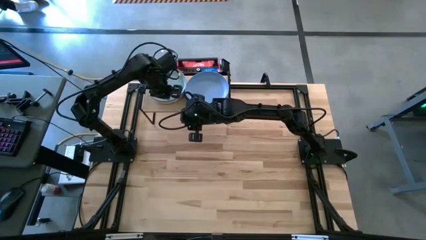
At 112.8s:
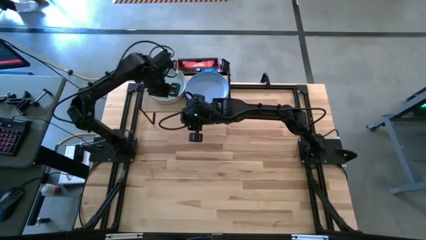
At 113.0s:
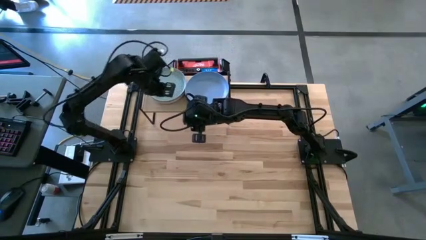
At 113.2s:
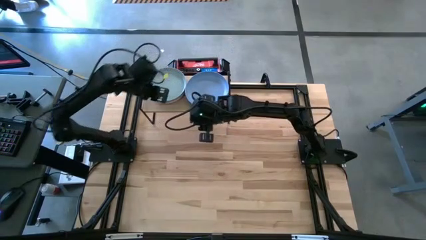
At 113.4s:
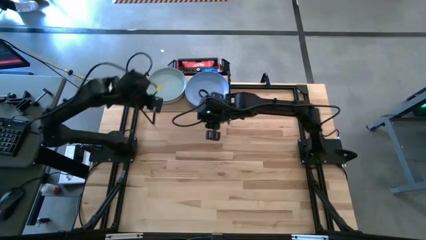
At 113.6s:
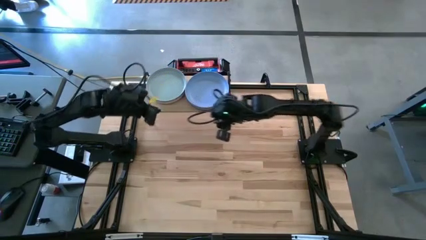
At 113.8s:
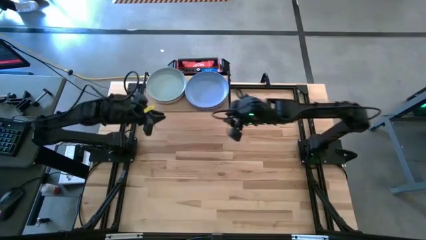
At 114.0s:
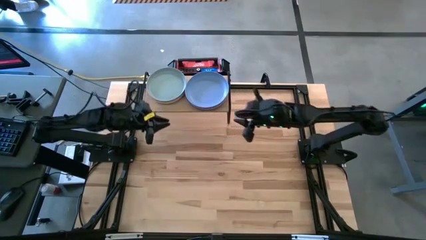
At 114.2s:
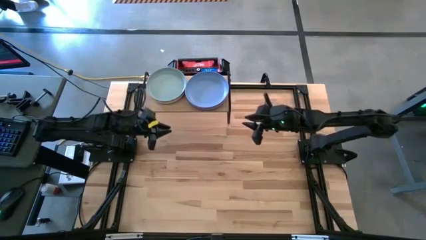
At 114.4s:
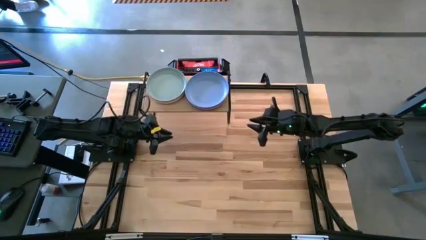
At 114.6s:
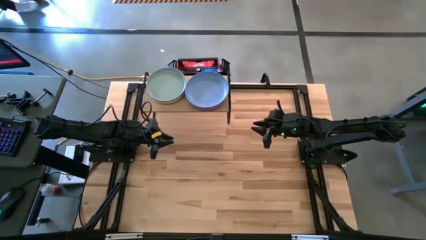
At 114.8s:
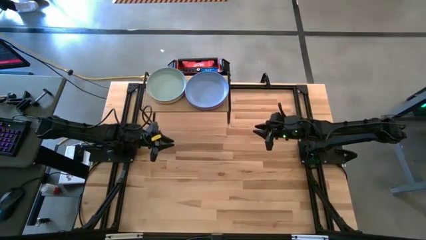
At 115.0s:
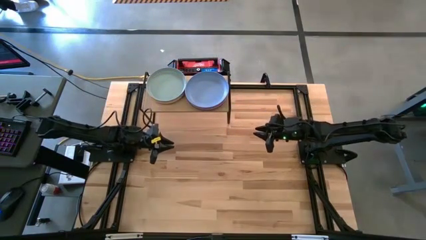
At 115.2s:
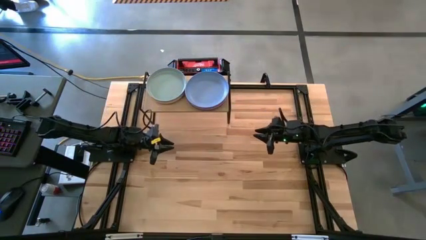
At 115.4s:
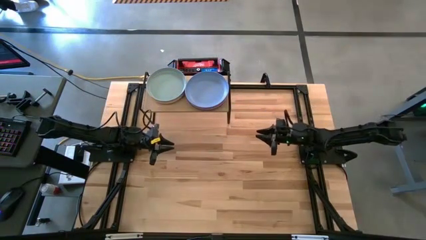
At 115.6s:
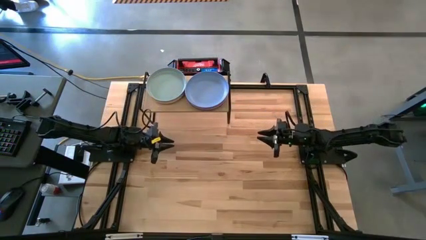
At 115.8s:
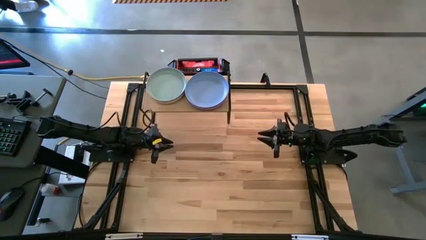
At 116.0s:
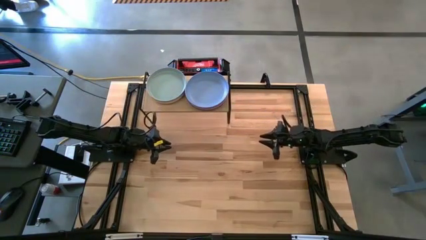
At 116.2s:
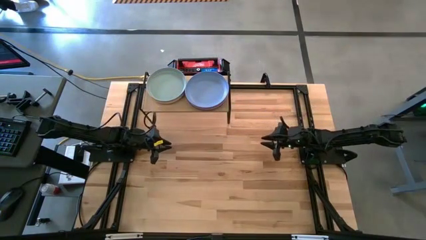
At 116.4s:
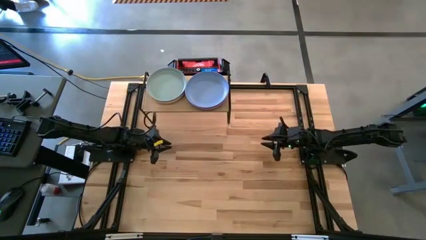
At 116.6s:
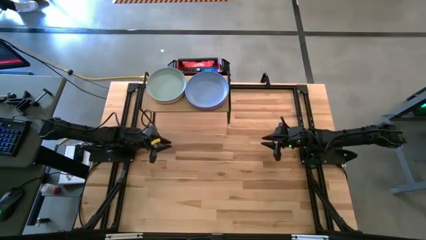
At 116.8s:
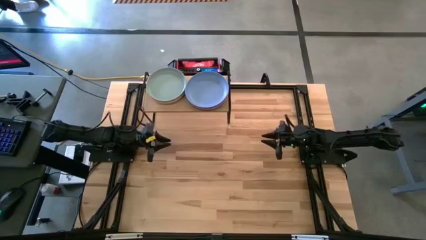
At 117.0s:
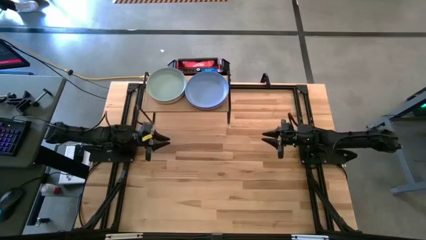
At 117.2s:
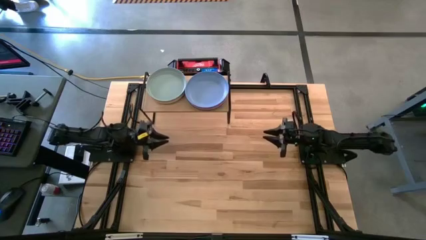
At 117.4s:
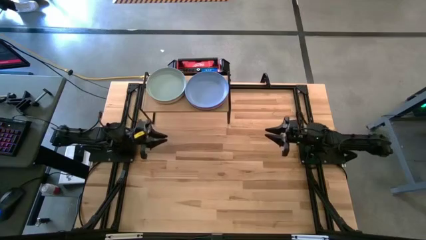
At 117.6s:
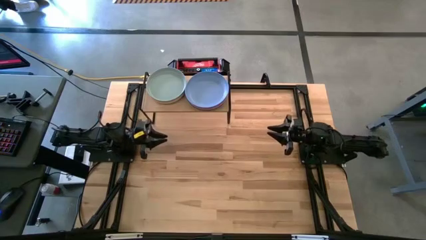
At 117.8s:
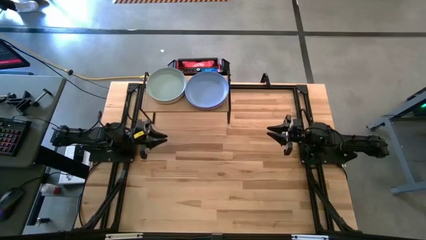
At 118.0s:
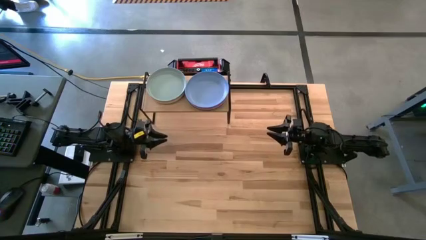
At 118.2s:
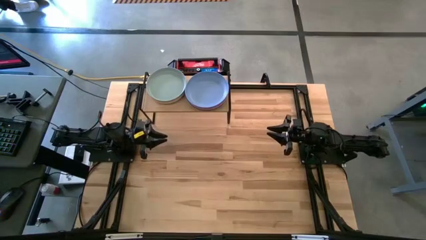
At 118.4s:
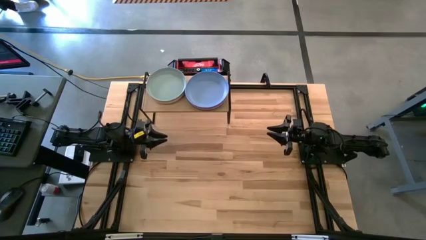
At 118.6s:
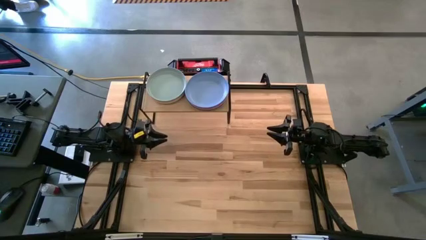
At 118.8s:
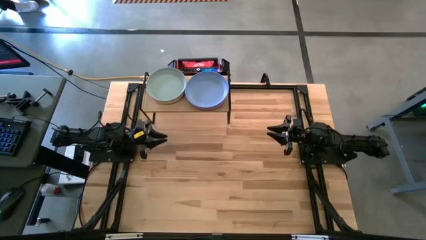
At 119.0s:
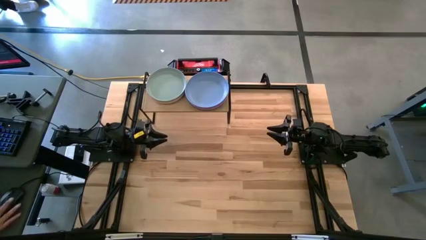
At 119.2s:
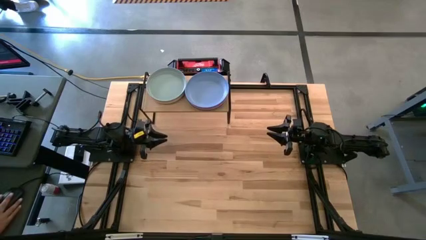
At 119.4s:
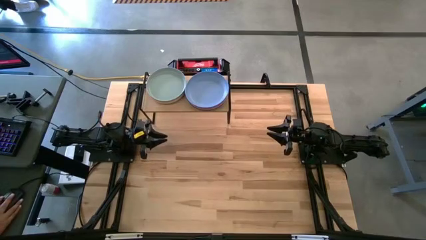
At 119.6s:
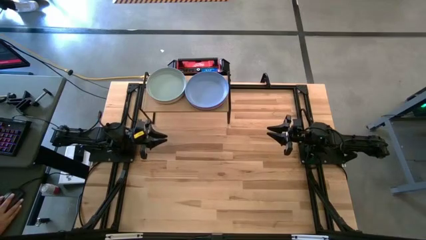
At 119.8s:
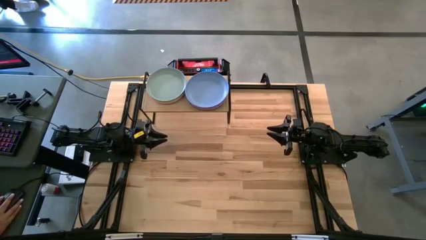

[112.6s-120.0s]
Task: Place and stack plates onto a shelf
Return to Home Position

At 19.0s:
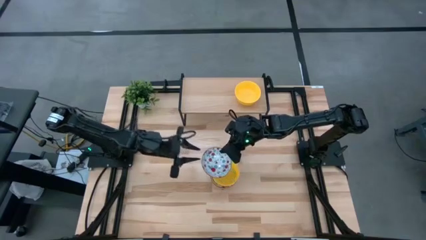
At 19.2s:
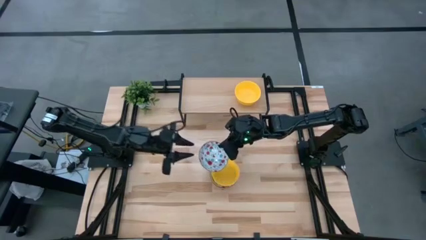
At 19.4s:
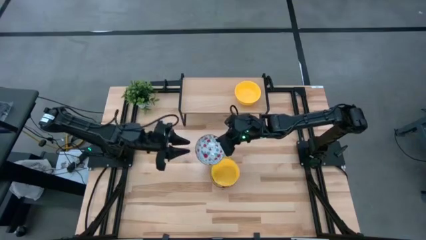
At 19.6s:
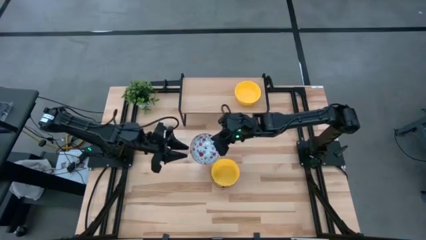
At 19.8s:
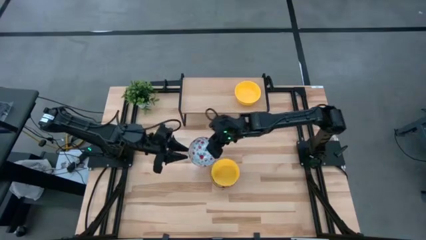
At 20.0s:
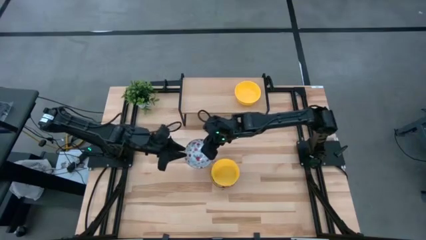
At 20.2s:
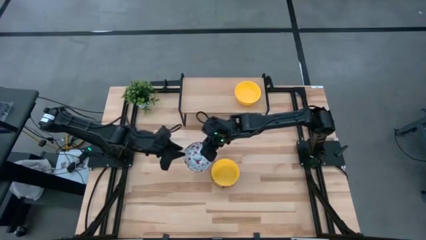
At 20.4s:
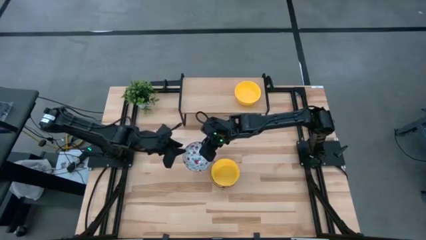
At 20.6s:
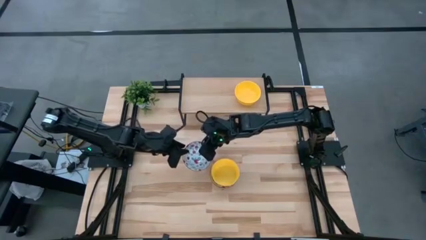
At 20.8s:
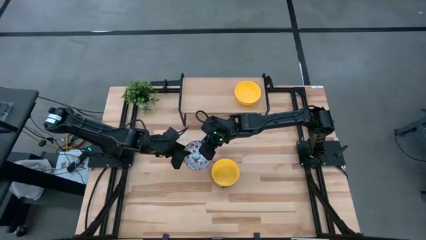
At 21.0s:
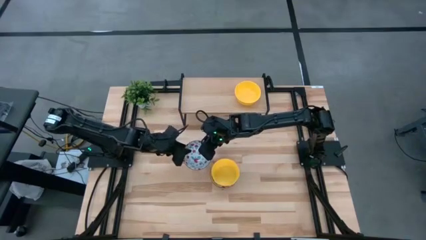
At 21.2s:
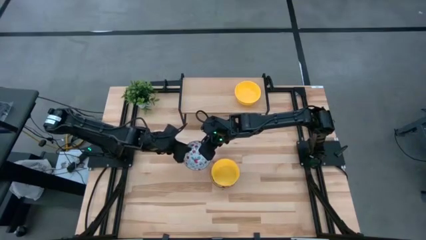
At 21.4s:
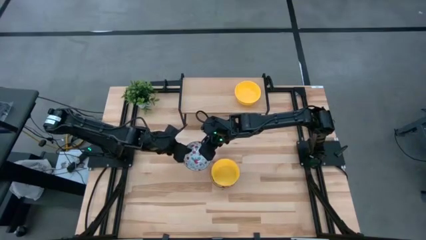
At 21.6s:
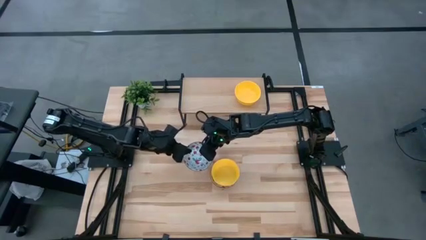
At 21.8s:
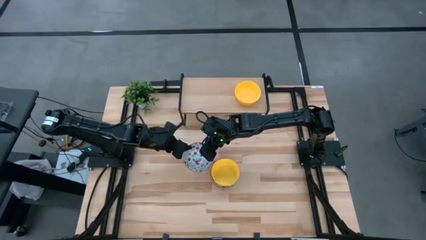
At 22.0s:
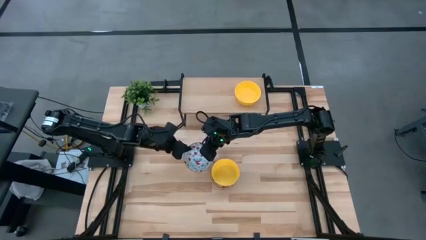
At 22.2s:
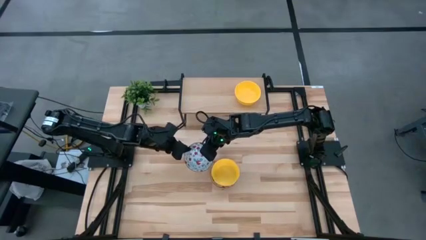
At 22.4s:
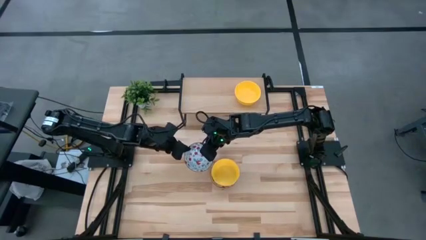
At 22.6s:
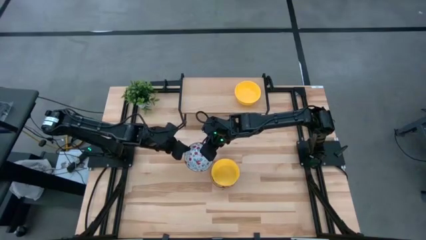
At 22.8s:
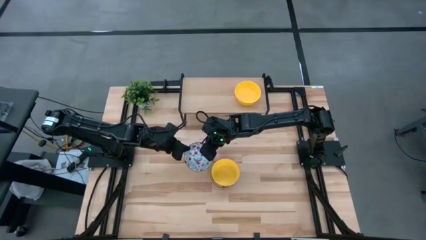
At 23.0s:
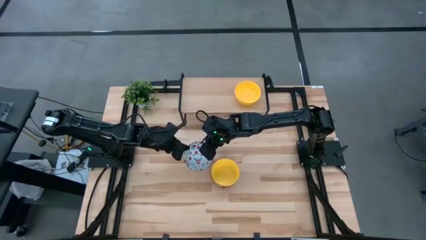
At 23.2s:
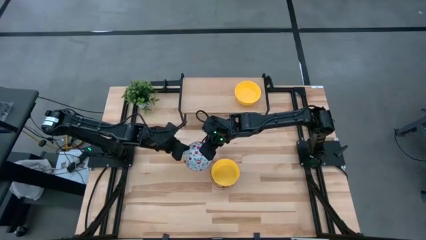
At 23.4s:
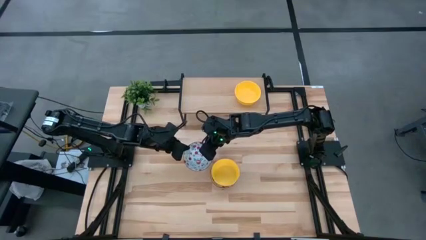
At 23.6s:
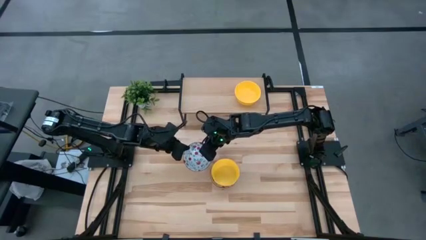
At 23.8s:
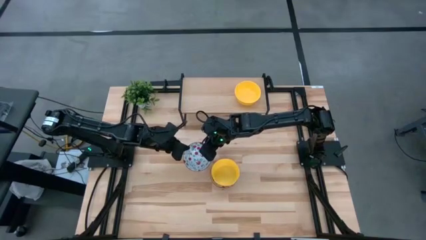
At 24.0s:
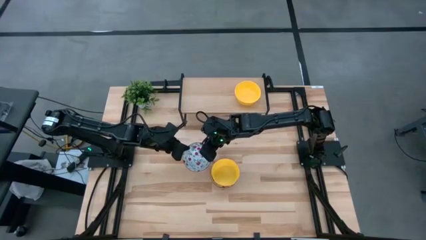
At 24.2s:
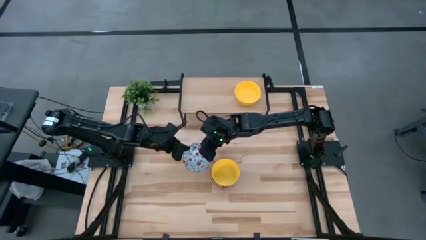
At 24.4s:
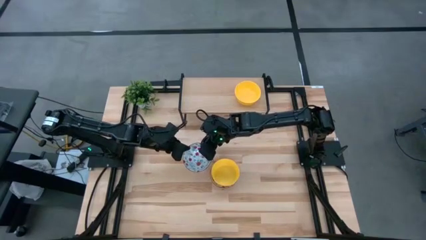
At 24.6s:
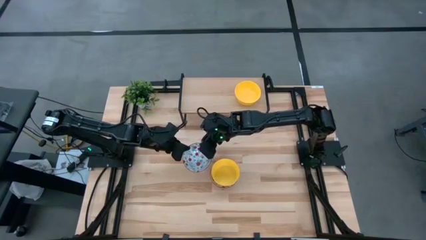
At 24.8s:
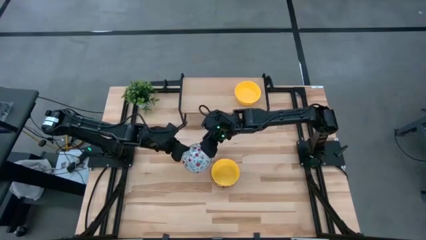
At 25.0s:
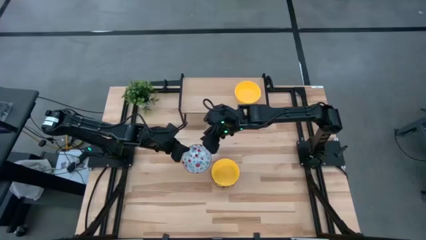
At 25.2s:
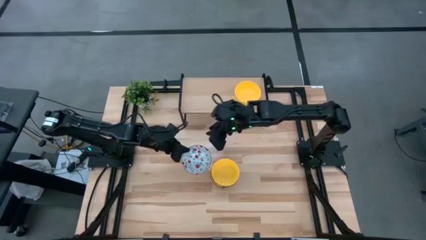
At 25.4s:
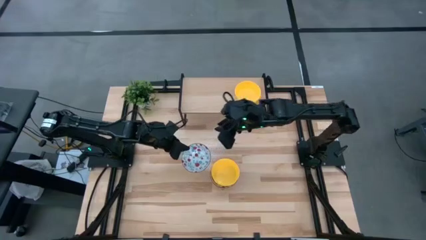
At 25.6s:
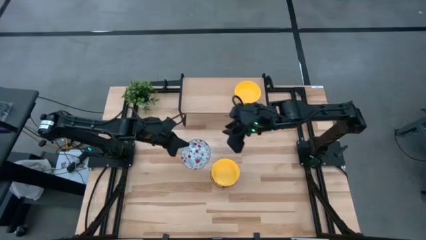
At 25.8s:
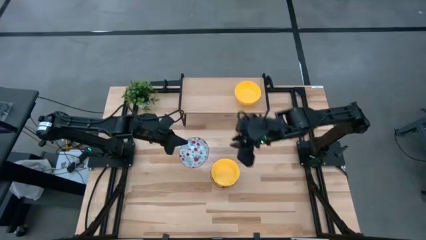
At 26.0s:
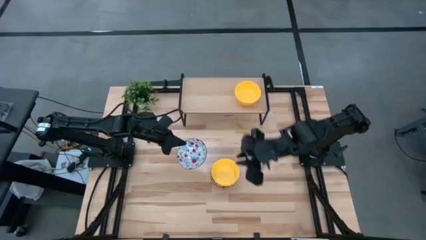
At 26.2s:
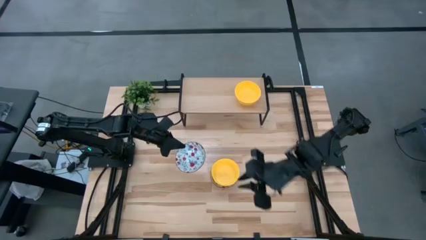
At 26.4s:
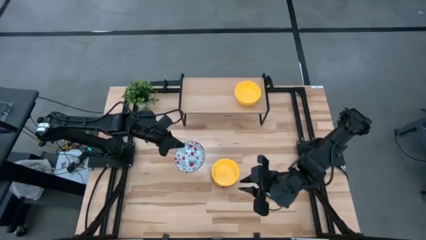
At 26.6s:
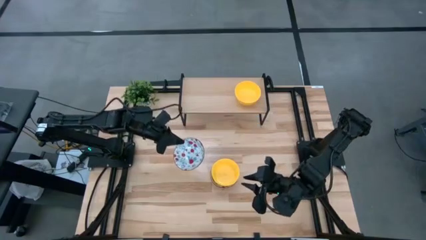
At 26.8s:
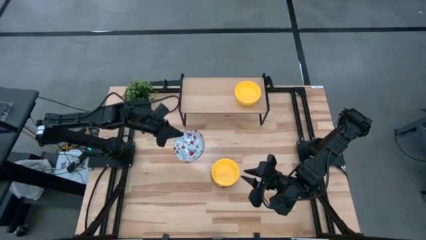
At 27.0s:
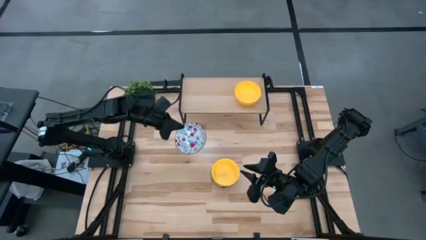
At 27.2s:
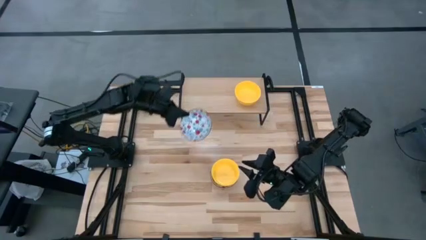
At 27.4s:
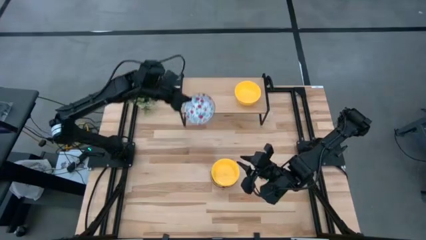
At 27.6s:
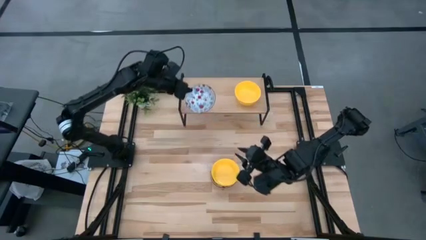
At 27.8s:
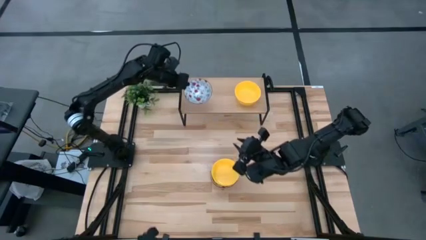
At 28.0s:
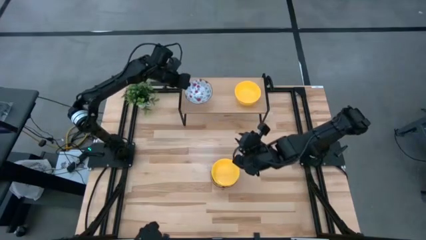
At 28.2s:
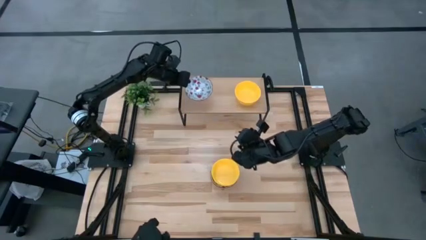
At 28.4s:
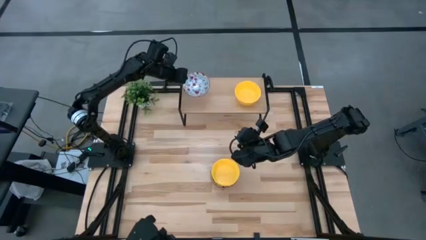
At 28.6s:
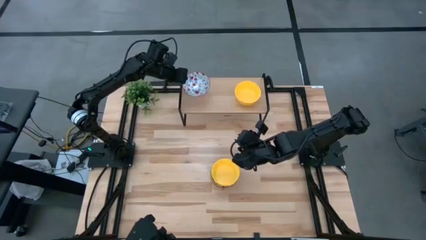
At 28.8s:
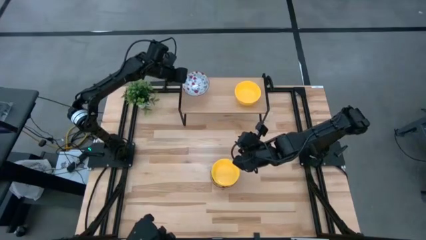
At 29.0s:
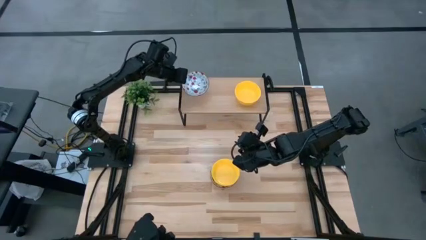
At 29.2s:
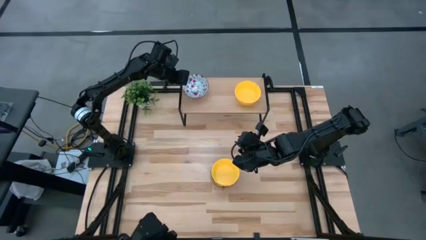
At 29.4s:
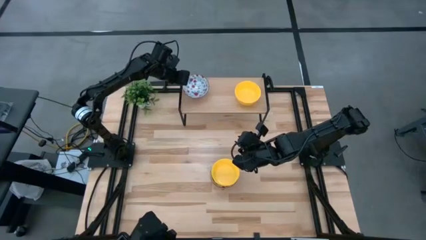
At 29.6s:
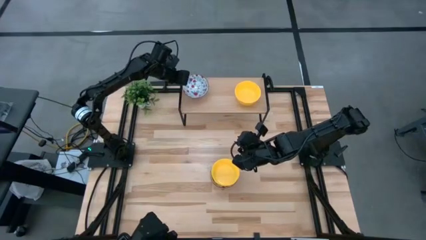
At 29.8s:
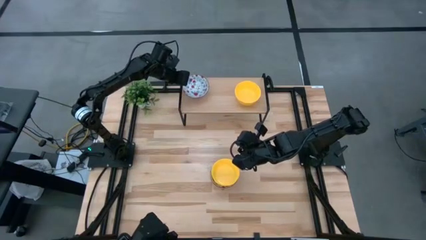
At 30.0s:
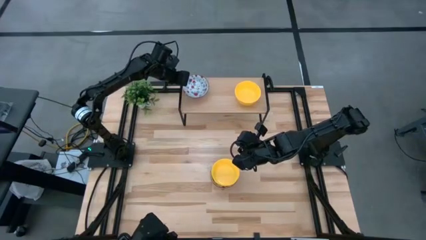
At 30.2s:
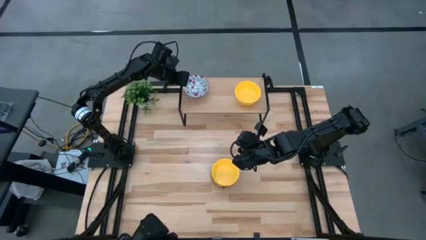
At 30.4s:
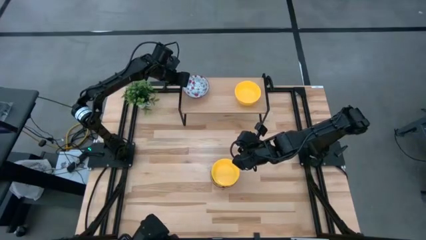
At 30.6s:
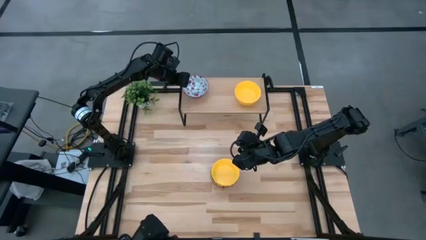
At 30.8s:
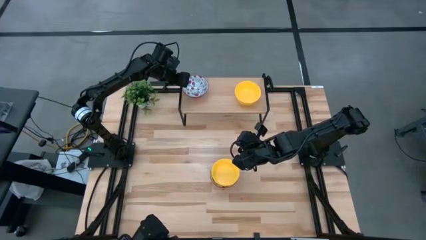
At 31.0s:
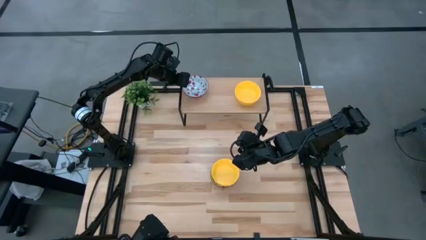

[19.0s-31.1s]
Task: Pick & Place Mini bowls
Put the red and blue bowl on the shelf
